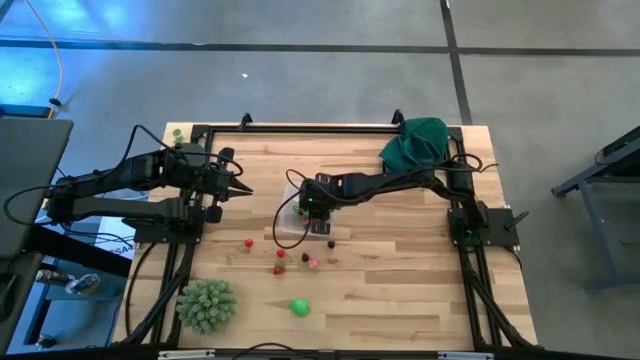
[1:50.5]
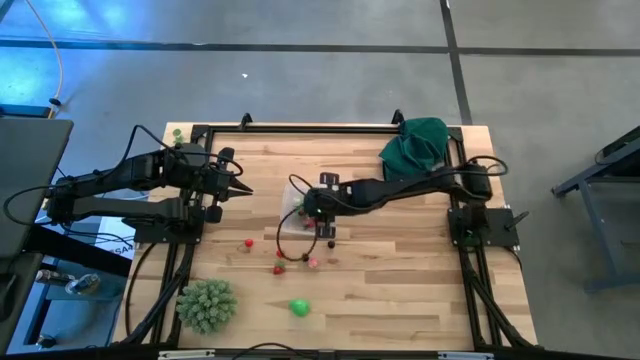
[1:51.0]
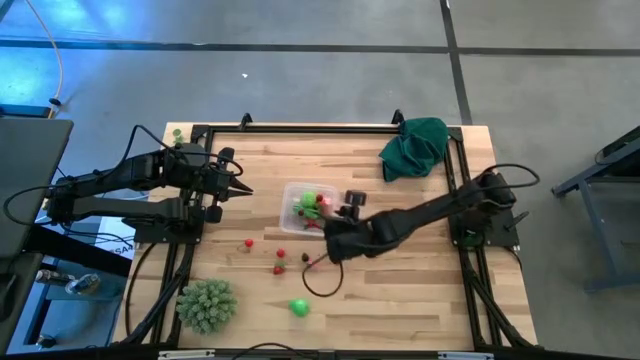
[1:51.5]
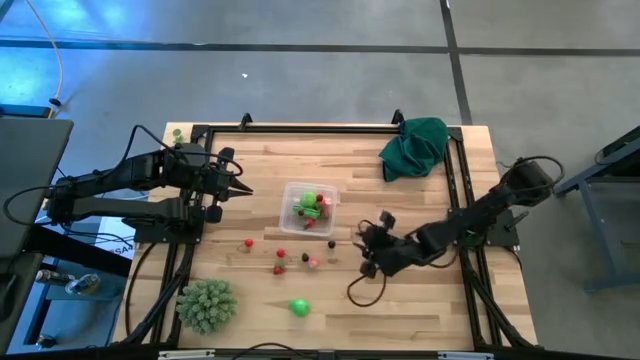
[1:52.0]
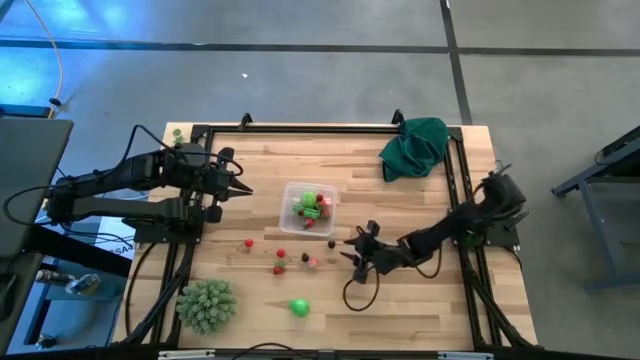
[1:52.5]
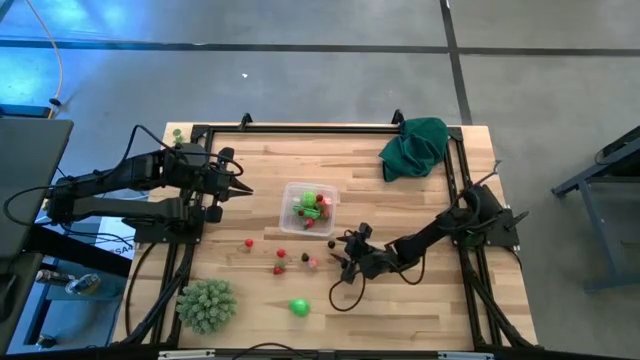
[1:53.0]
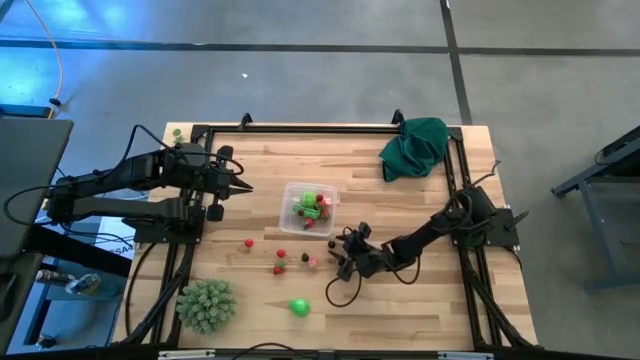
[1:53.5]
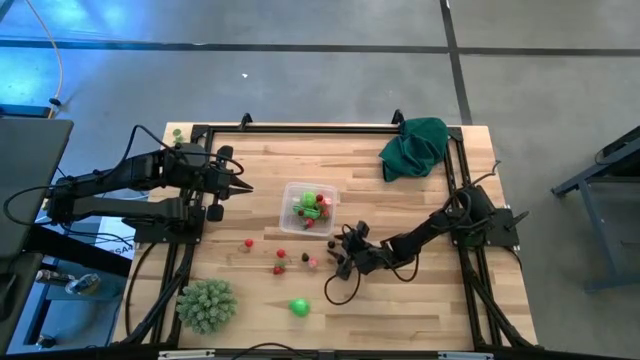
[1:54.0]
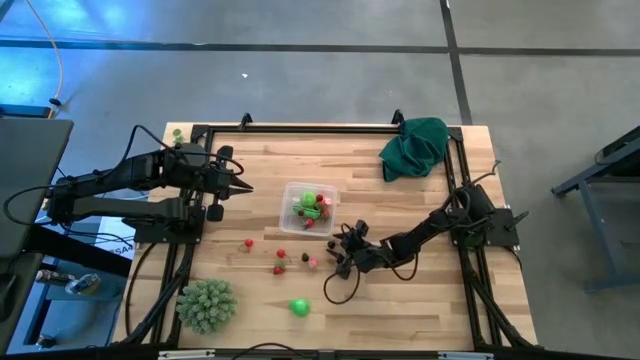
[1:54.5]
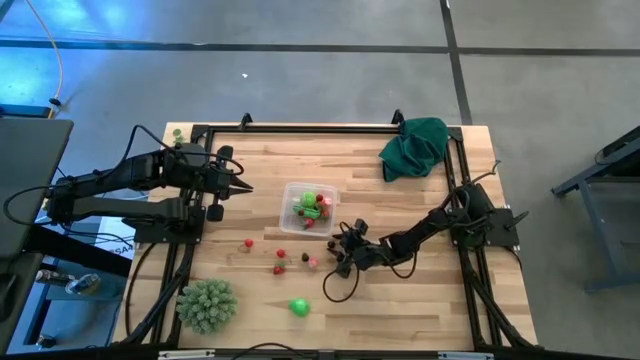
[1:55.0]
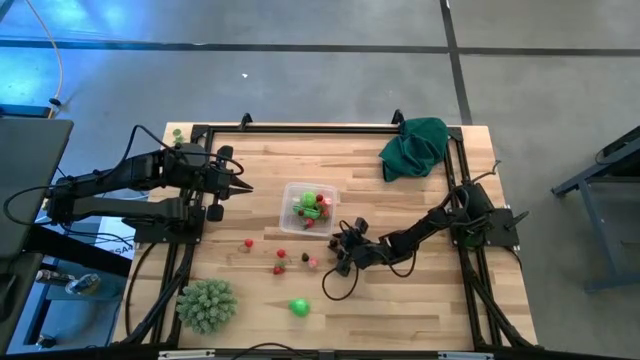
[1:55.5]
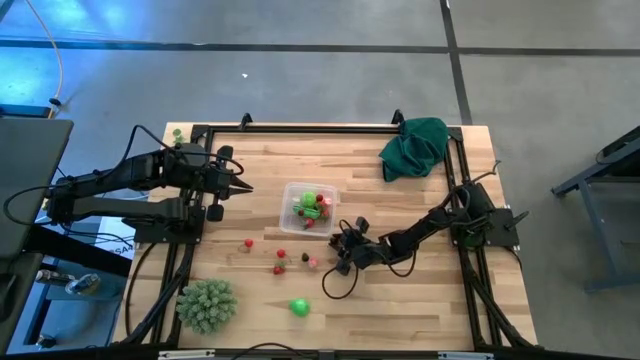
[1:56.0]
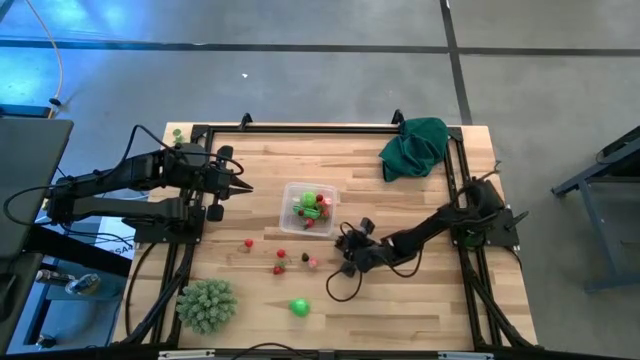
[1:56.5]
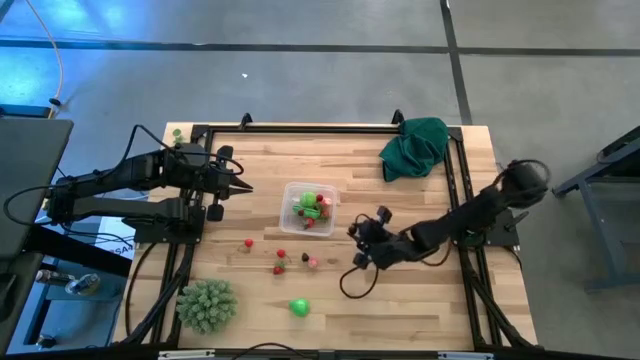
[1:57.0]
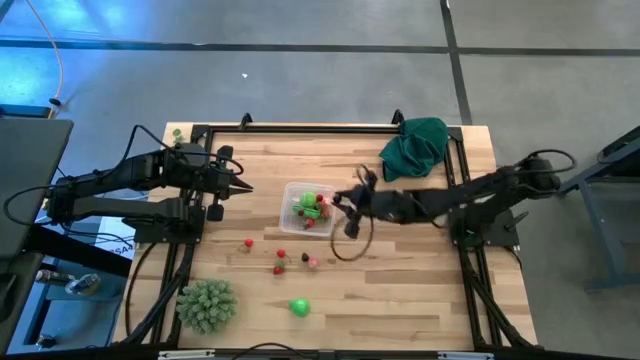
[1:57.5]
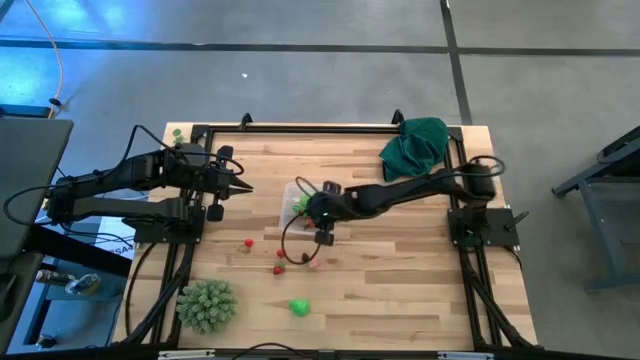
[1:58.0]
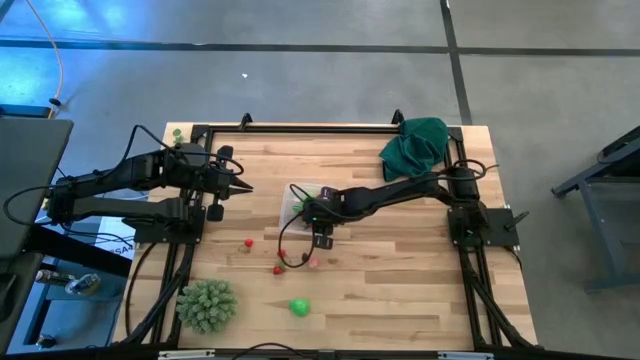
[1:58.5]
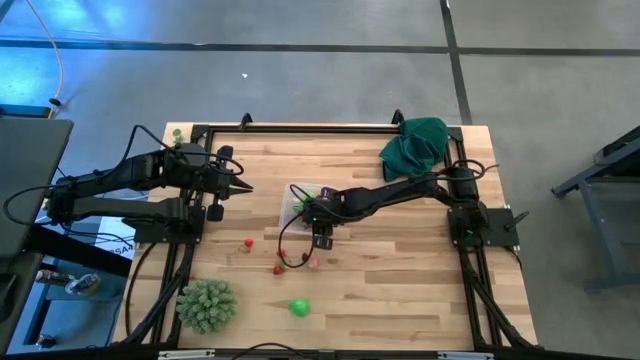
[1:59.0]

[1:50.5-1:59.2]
Task: Pick and placing Produce into tupperware
Put the black cherry into the transparent container

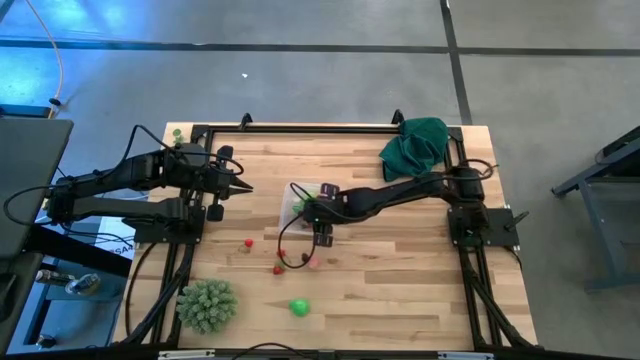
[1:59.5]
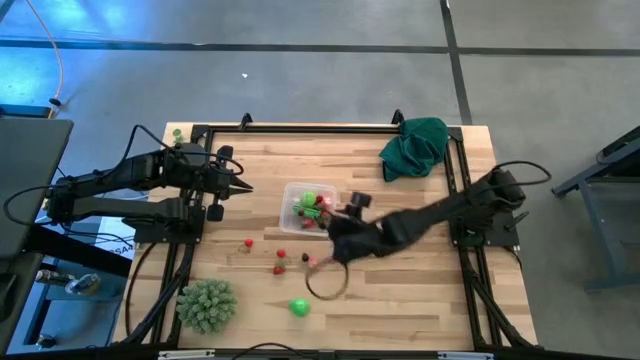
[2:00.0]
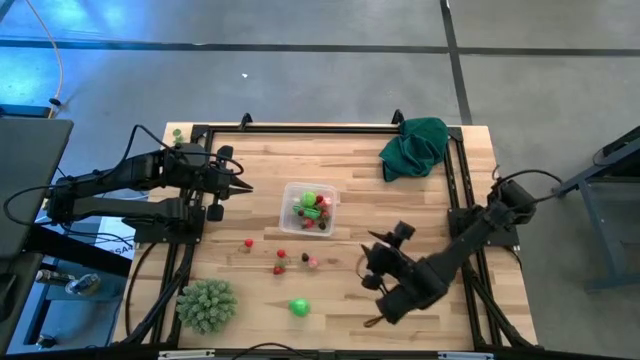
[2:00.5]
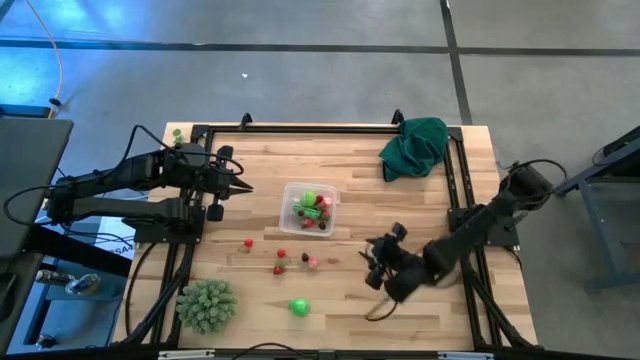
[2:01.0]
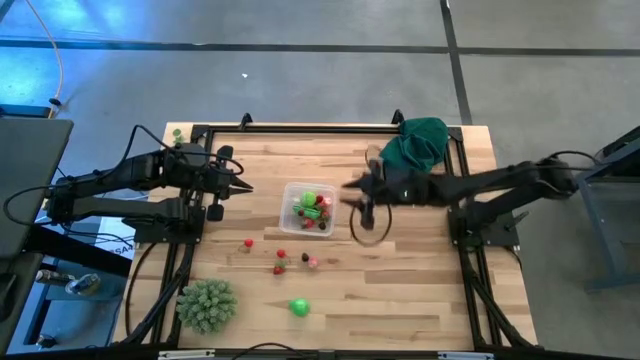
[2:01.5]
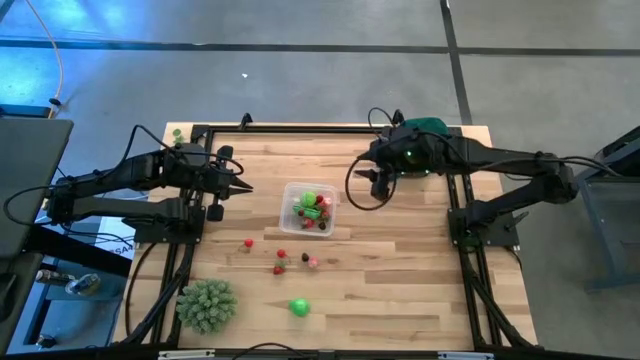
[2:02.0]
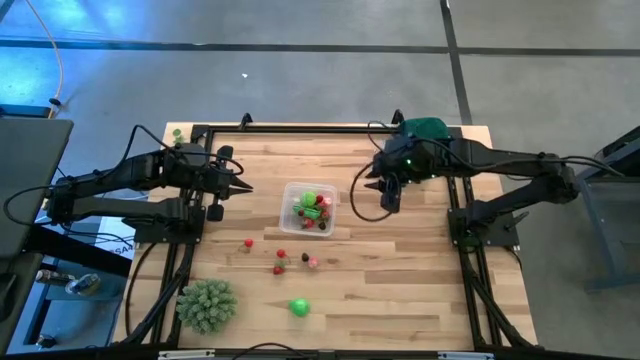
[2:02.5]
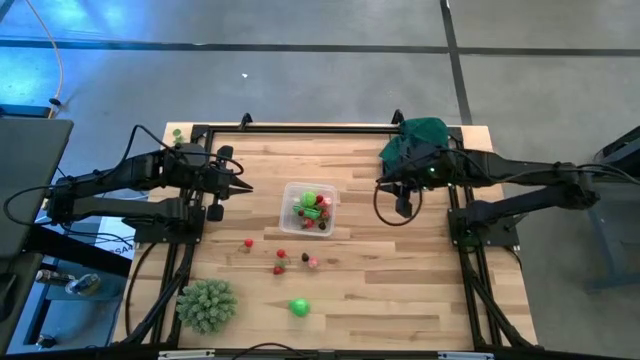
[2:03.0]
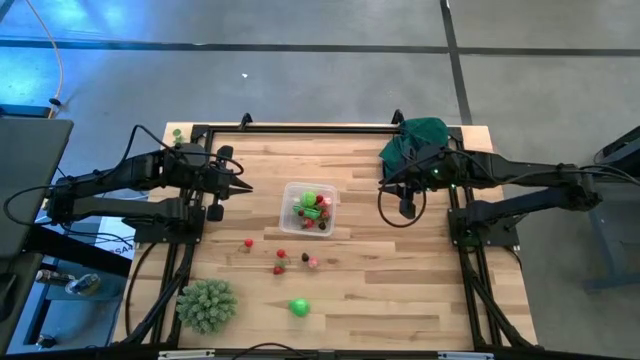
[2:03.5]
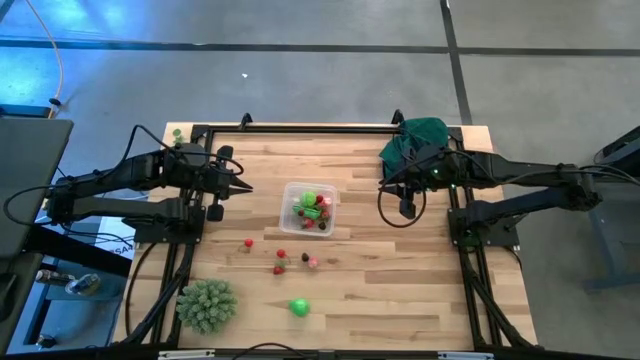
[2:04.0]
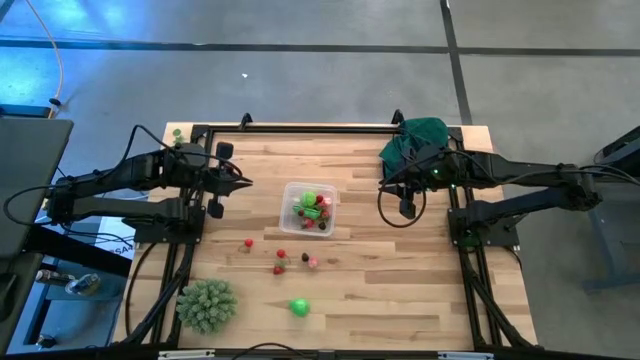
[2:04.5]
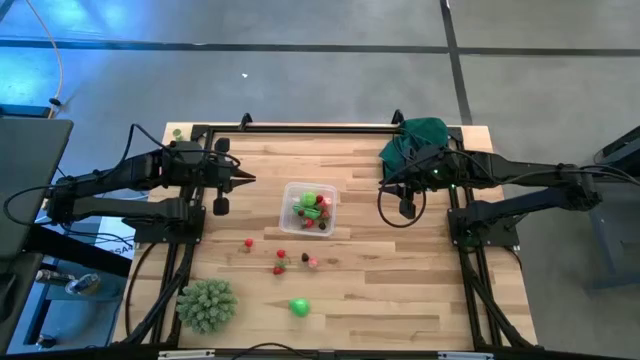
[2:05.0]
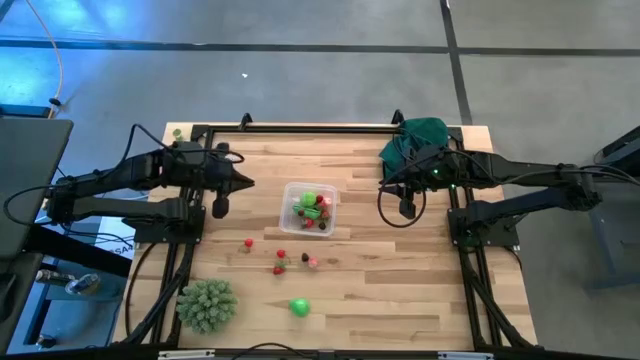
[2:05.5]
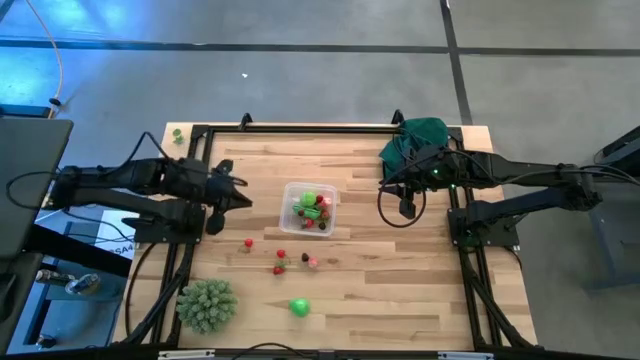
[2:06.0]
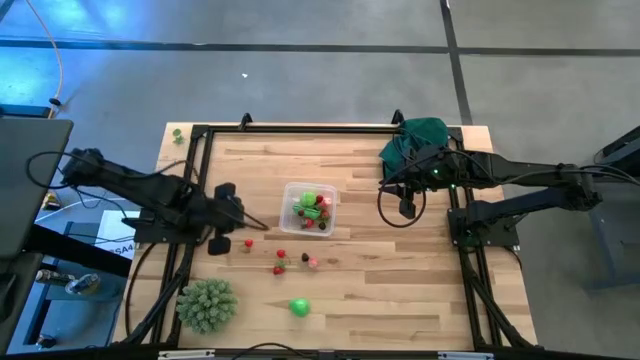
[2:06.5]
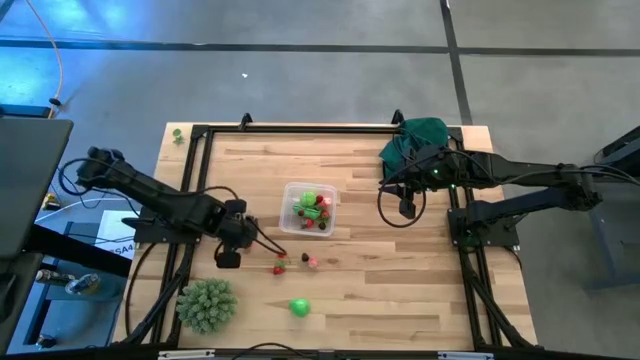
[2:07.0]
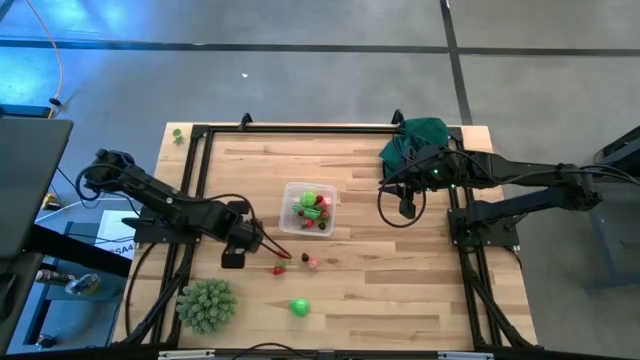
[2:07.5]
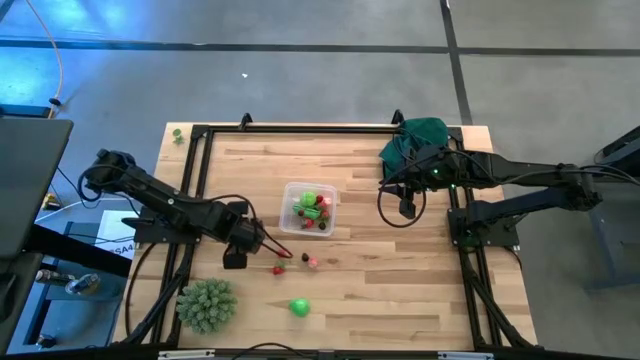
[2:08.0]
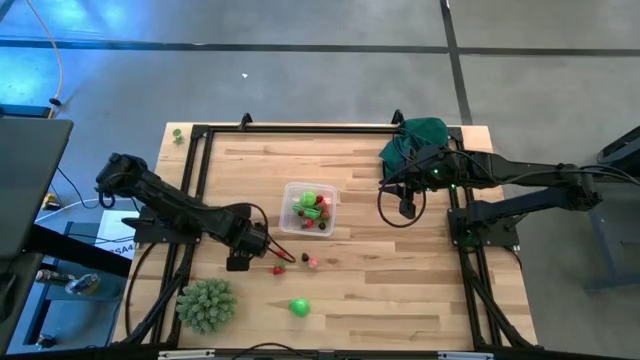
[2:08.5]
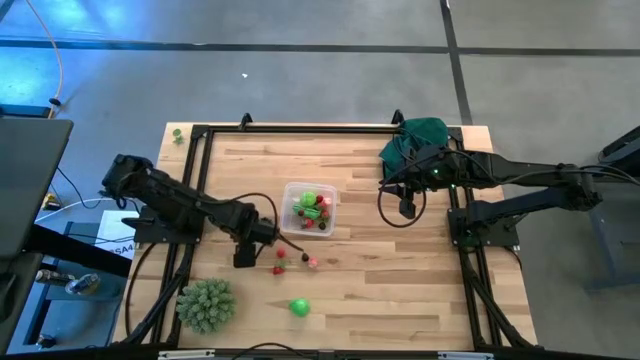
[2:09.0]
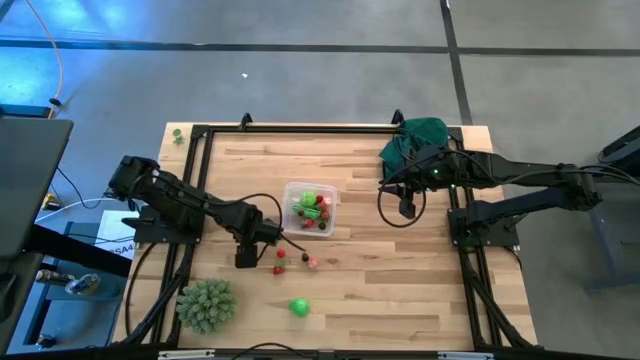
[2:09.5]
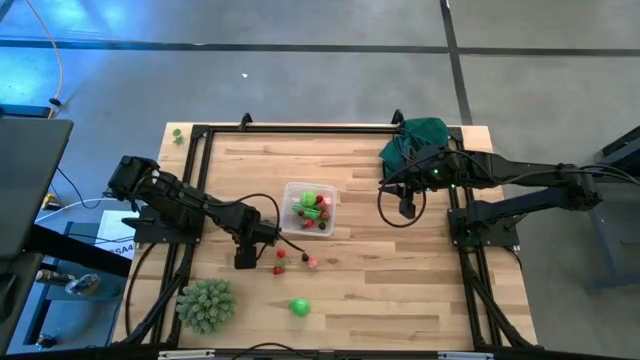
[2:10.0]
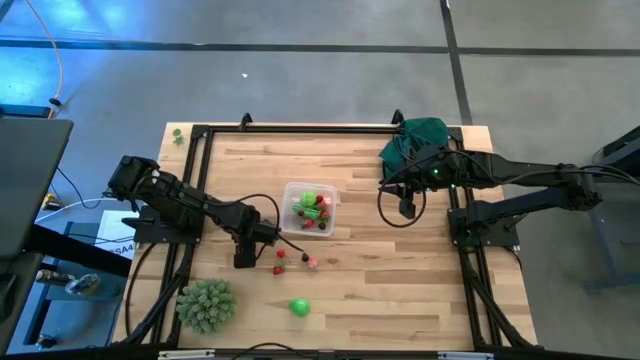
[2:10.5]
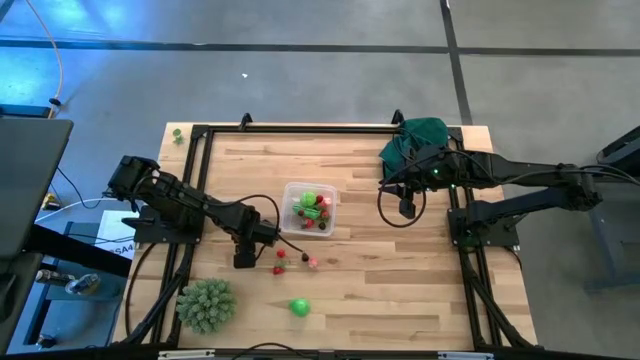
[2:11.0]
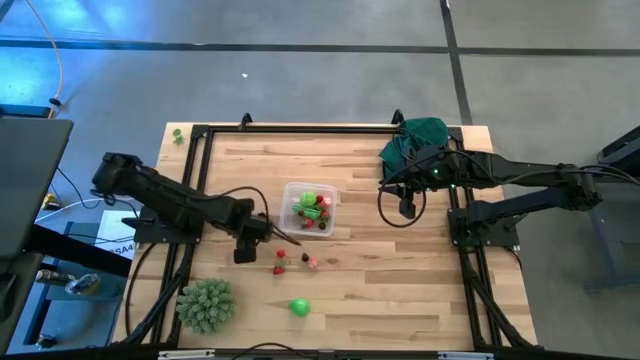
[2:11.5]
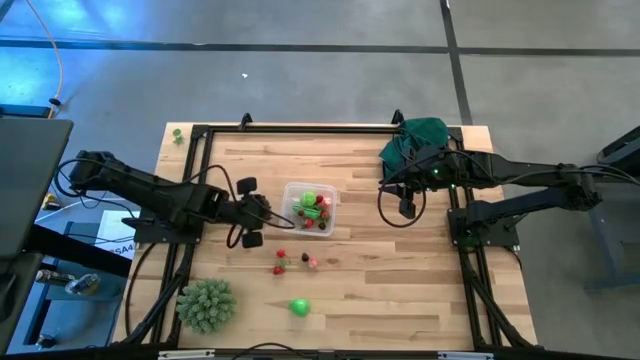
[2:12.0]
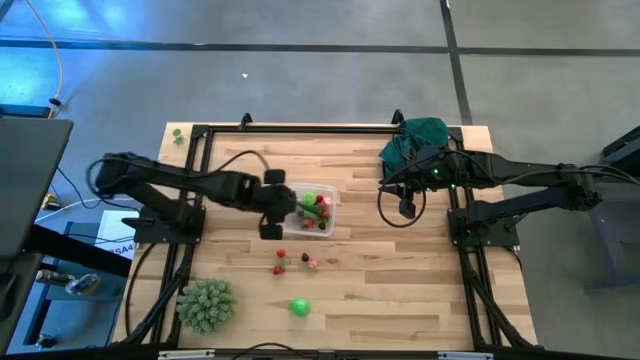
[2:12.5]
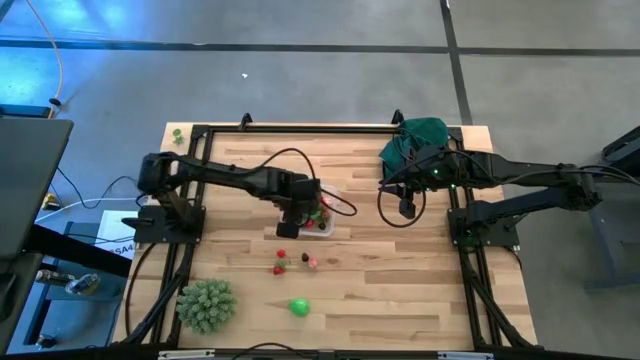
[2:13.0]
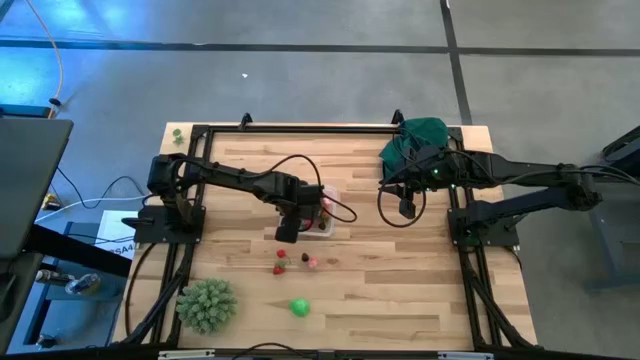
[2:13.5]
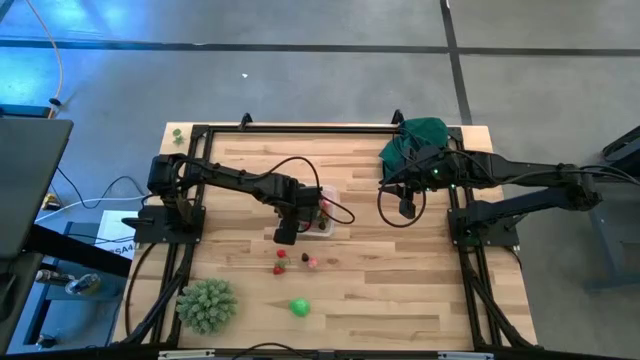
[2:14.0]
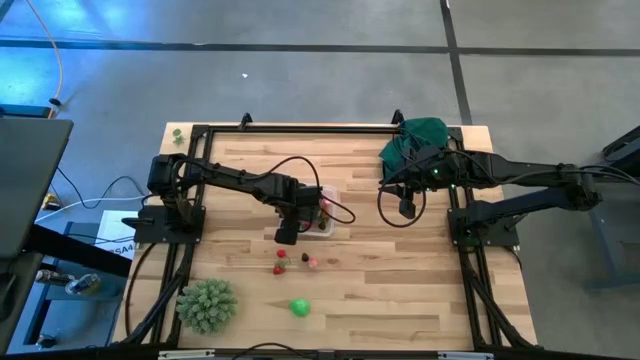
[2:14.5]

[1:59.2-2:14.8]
Put the red cherry into the transparent container
